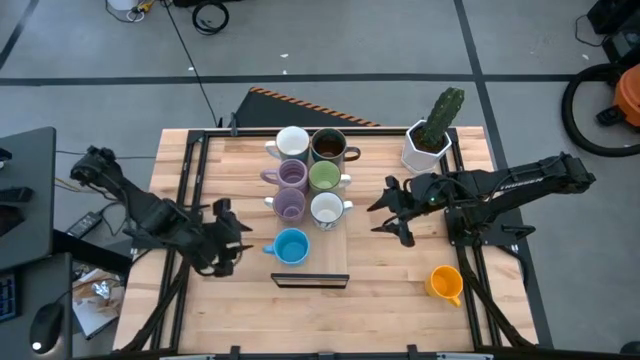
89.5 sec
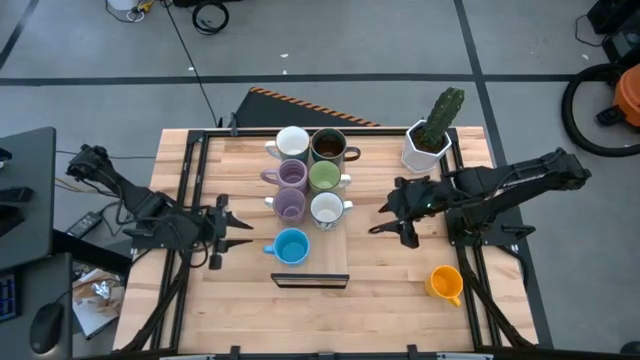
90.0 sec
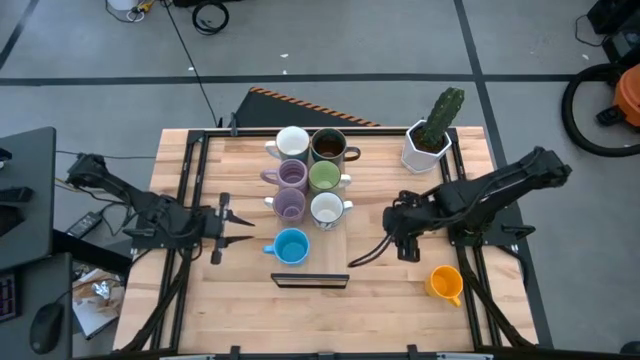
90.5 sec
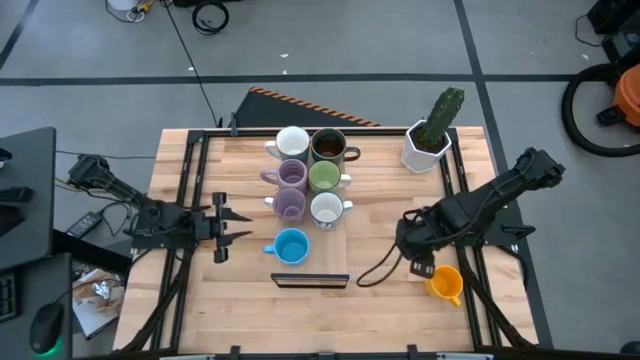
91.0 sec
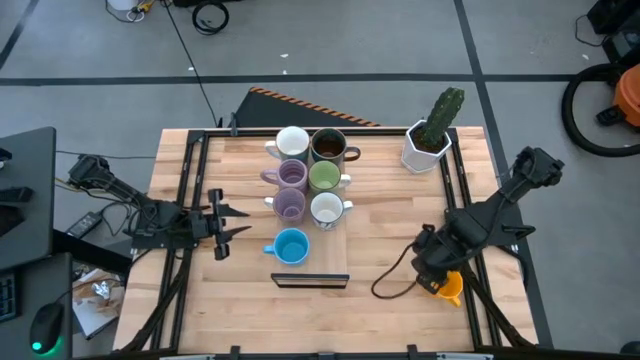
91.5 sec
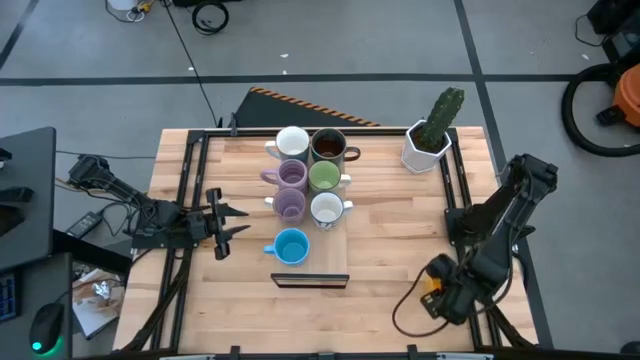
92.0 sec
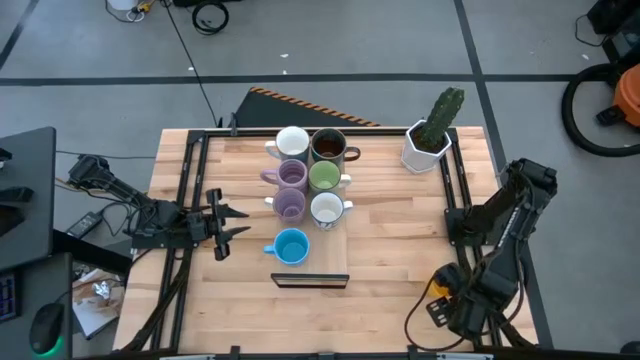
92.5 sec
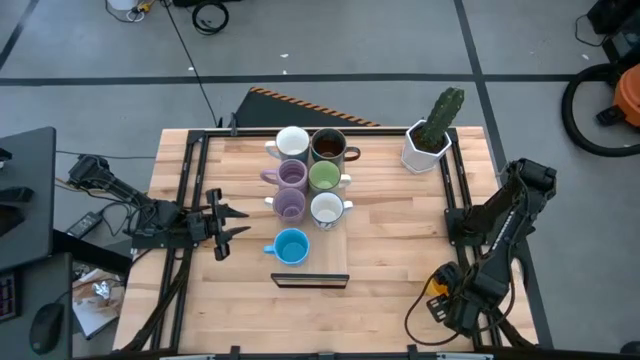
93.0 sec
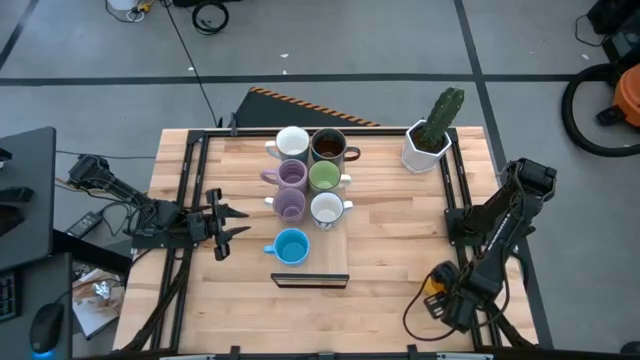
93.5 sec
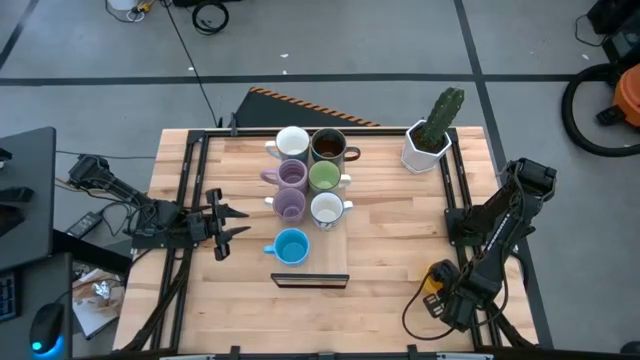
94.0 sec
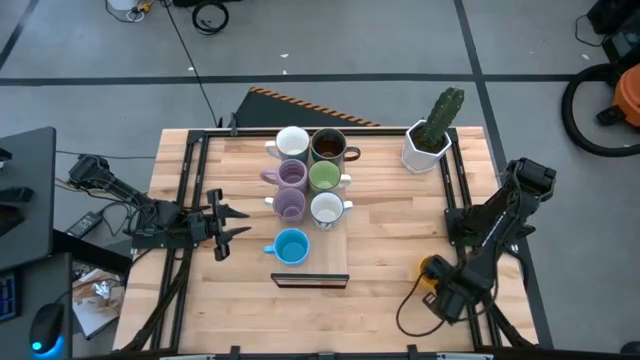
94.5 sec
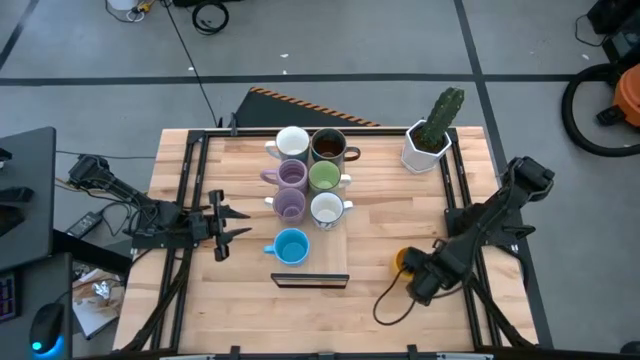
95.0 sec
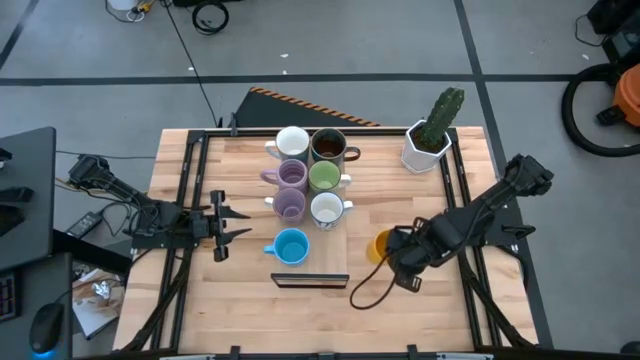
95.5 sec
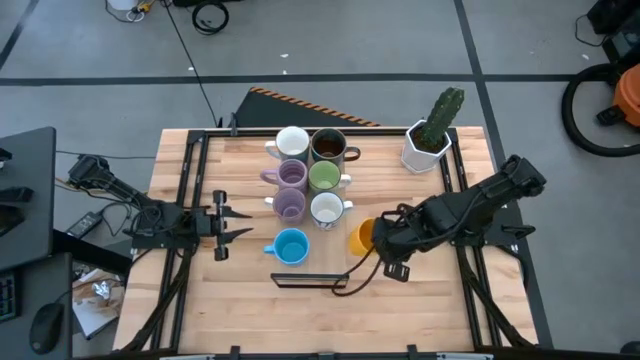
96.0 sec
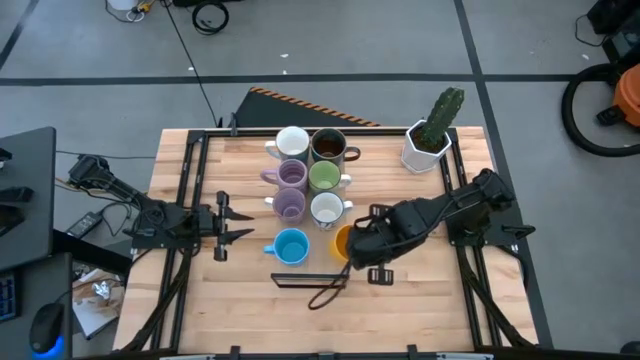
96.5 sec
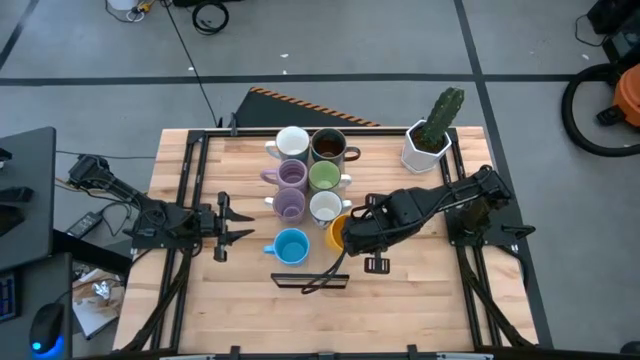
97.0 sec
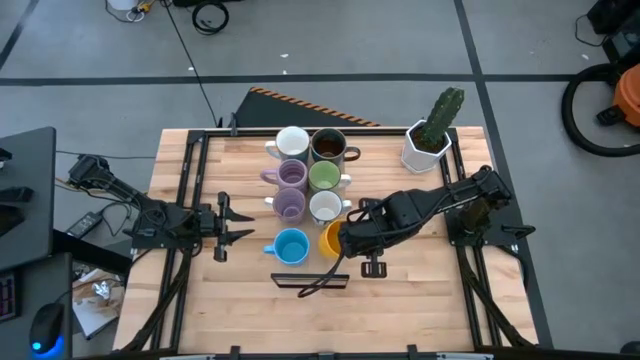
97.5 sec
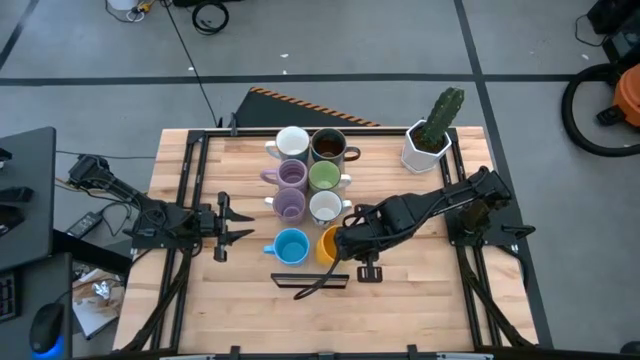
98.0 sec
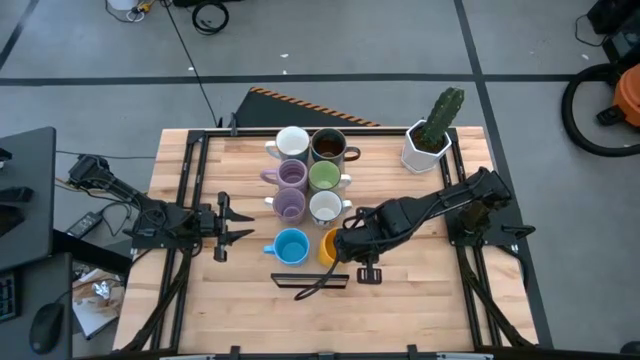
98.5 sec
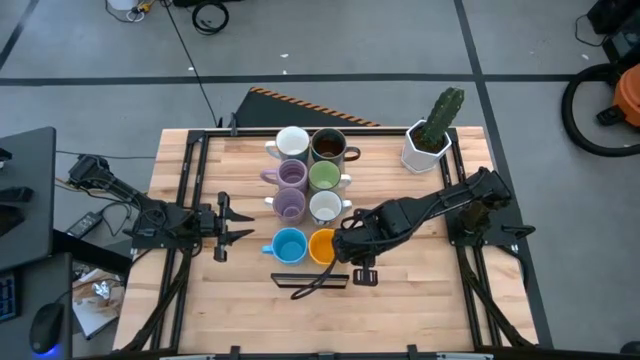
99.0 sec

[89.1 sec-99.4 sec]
Task: Place coffee mugs
Put the yellow mug on the shelf

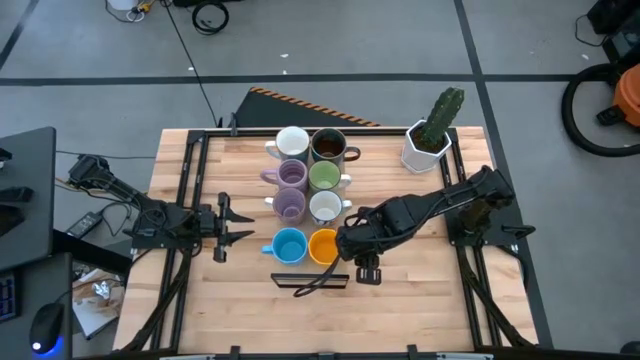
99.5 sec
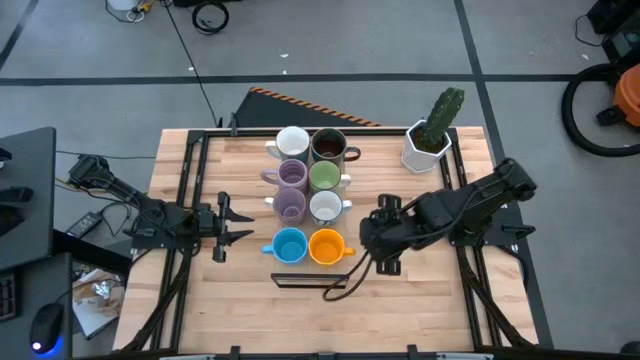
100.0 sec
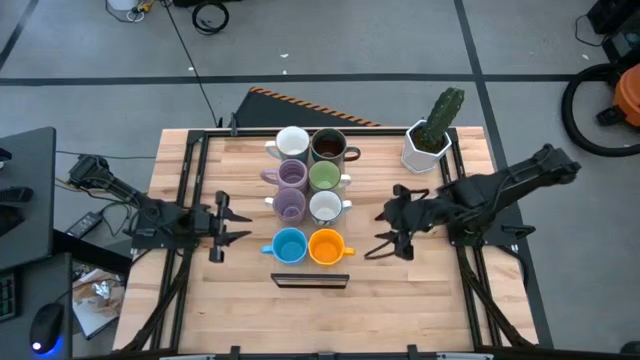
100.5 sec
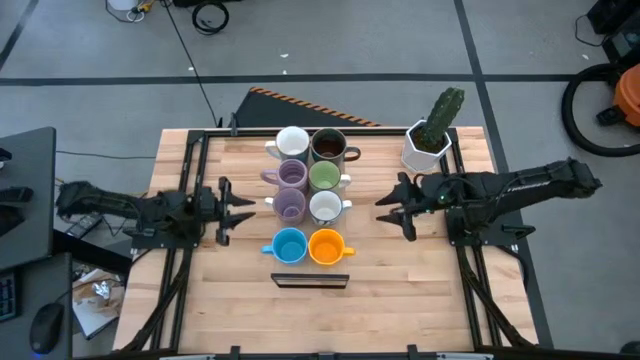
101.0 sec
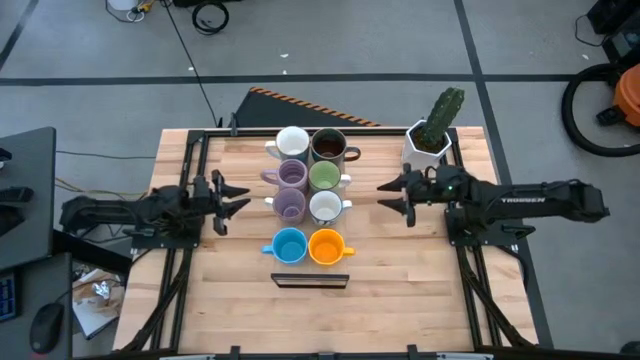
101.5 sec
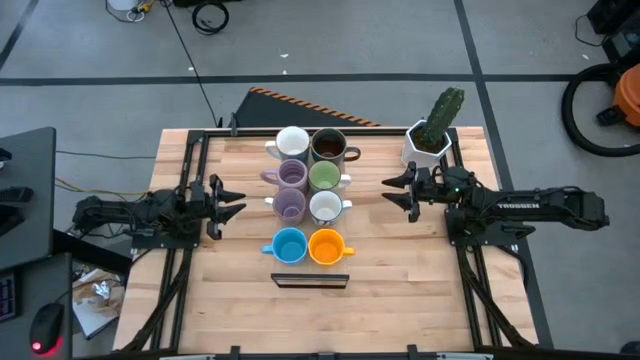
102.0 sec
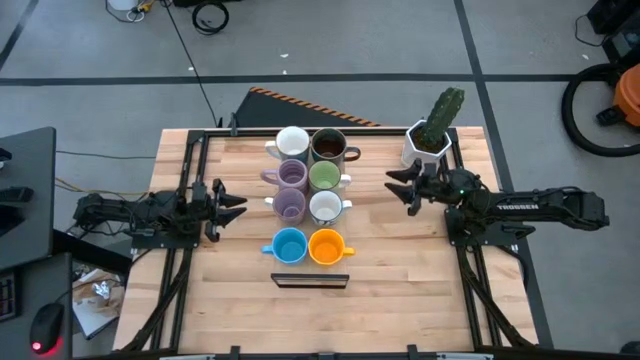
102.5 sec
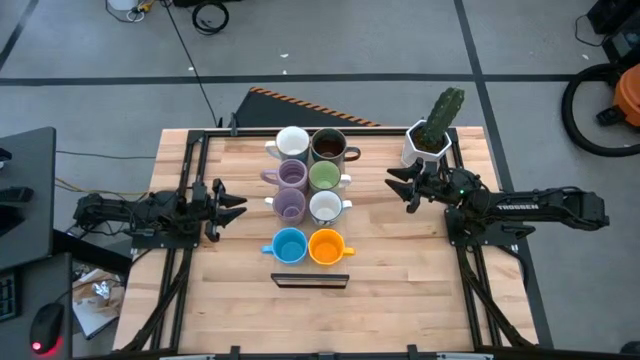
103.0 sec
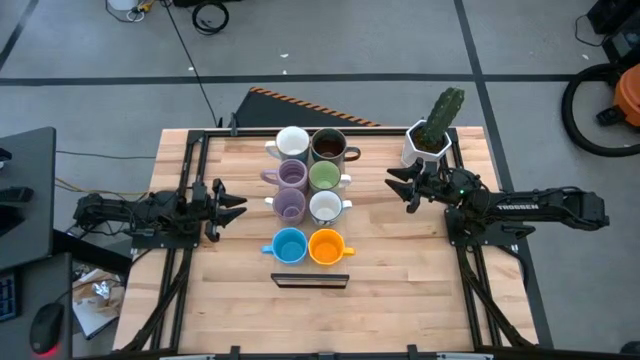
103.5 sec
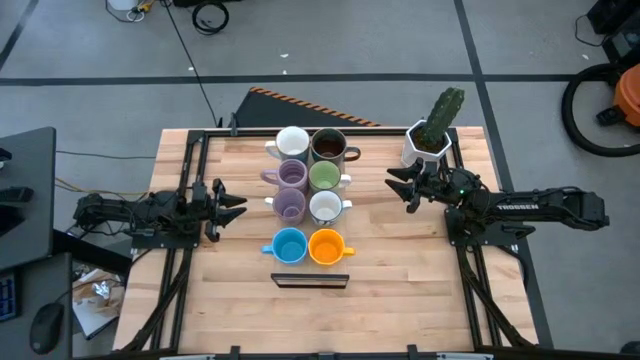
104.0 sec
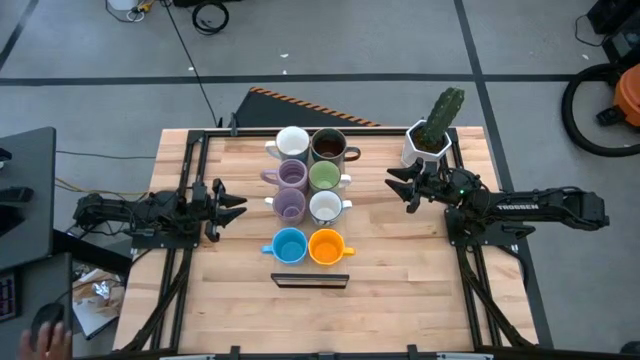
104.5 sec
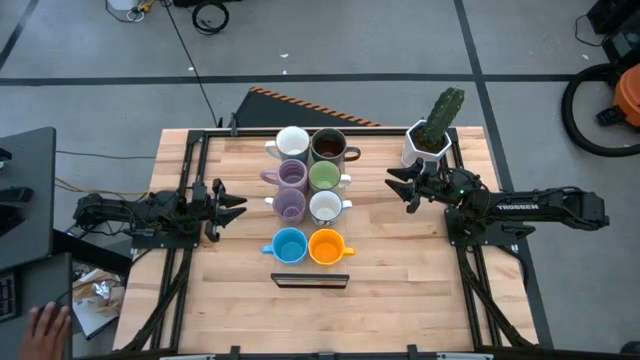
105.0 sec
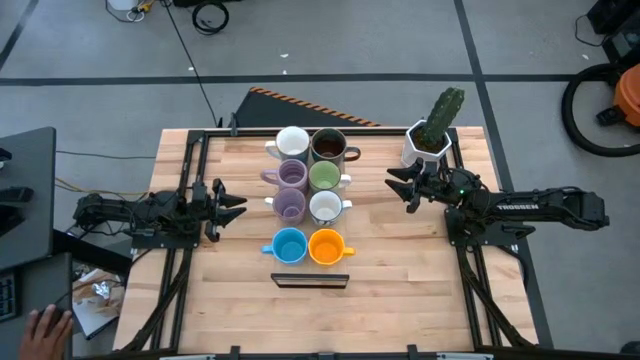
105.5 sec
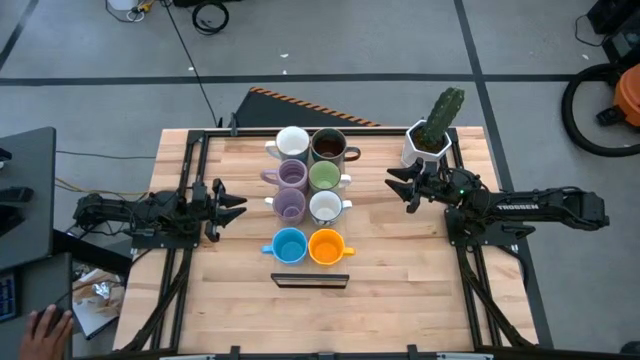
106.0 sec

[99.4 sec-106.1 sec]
Return to Home Position

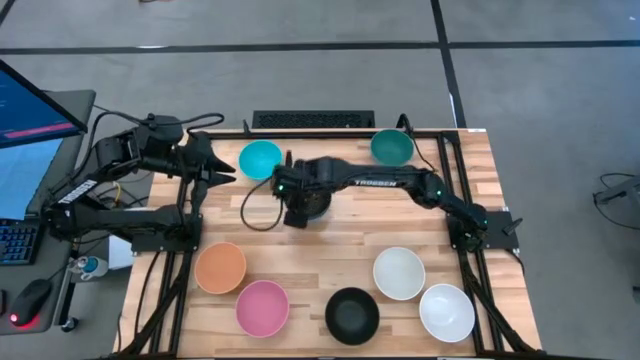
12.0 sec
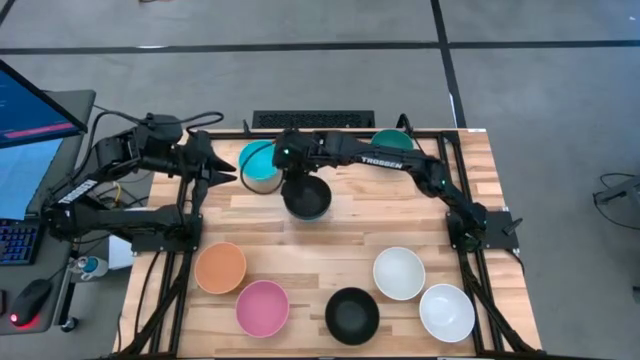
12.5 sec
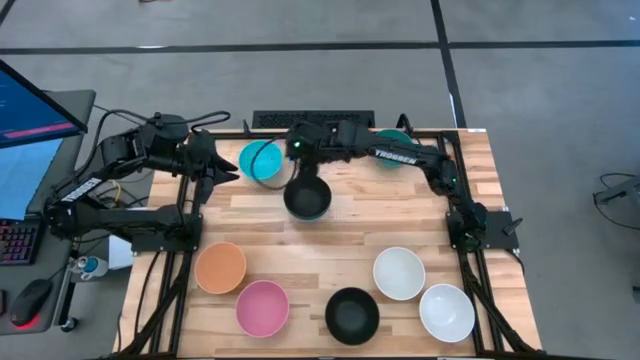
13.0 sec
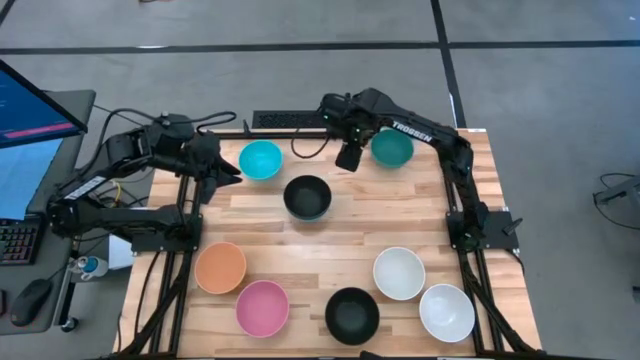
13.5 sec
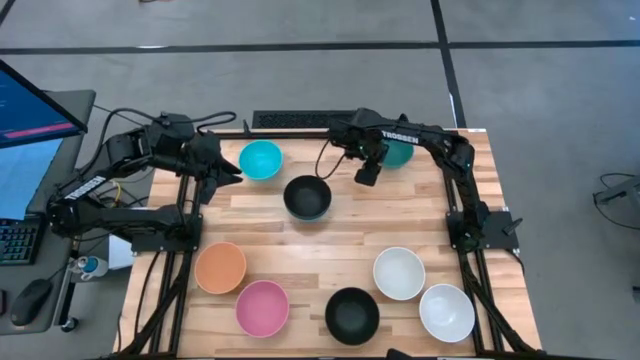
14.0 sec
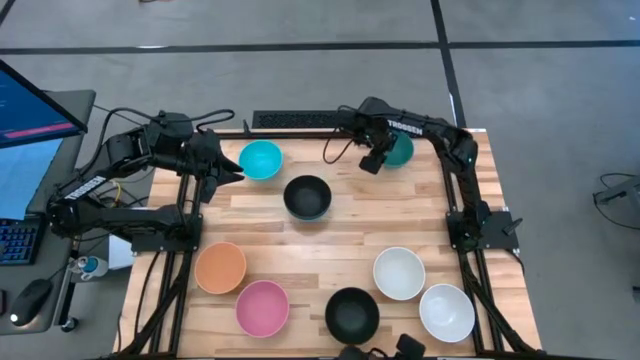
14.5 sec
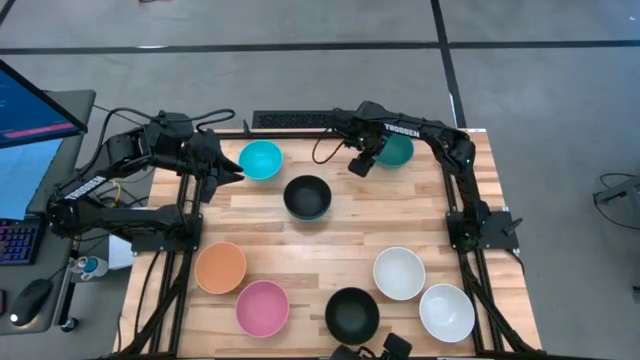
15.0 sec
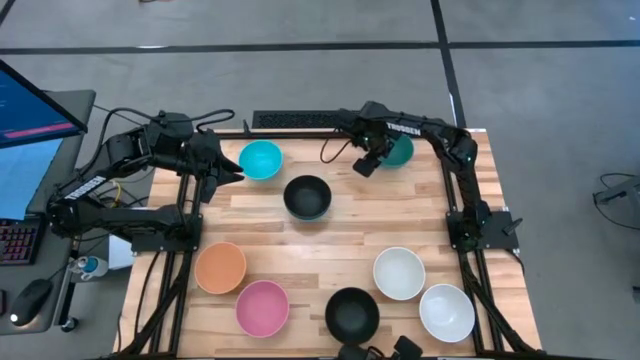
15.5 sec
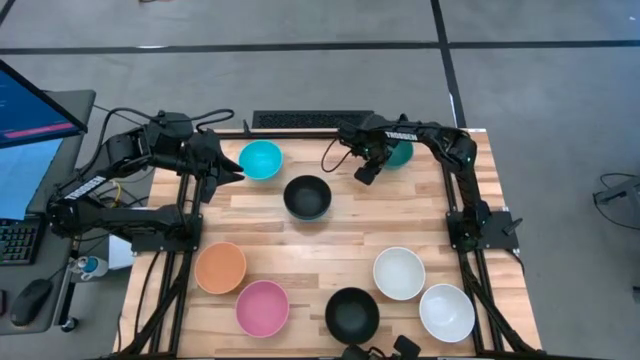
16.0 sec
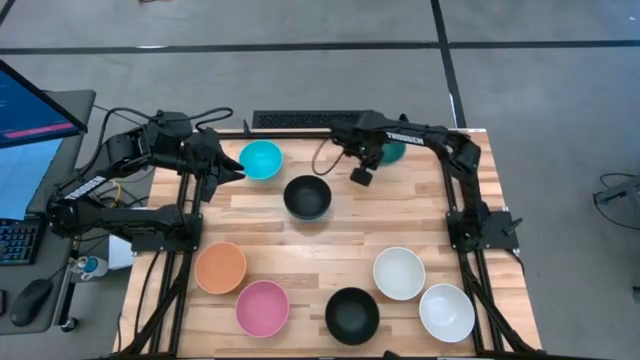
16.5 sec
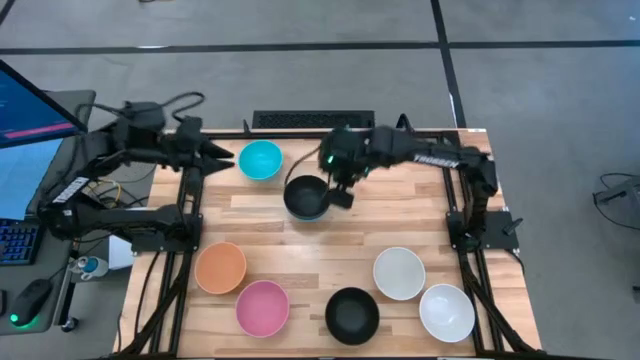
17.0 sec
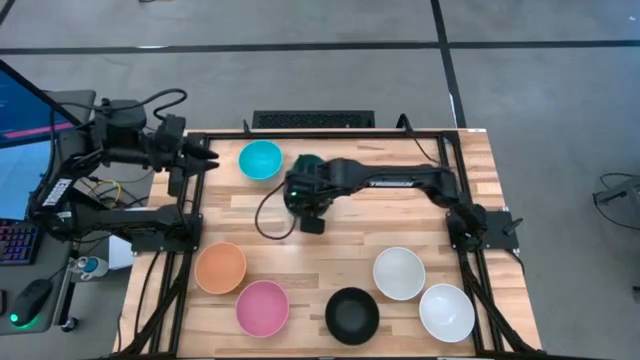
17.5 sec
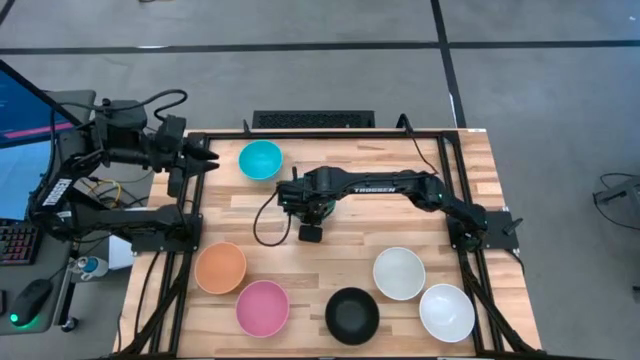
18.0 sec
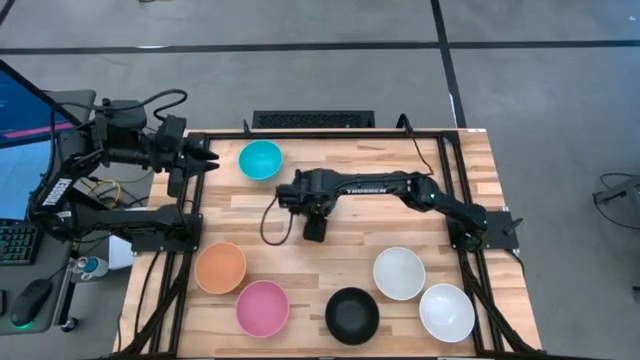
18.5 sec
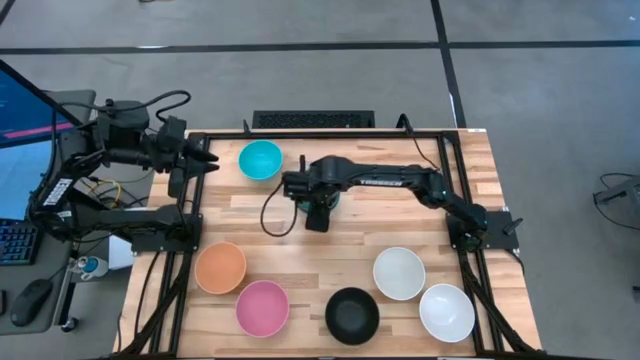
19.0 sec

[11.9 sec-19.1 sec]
Task: Nest bowls inside each other
Stack the green bowl on top of the top black bowl
